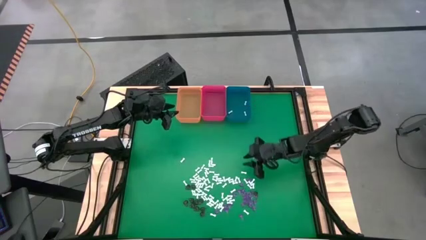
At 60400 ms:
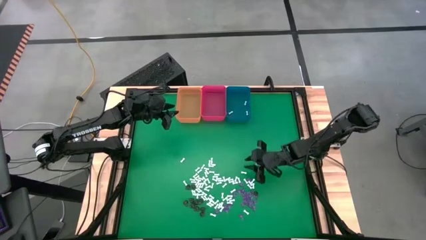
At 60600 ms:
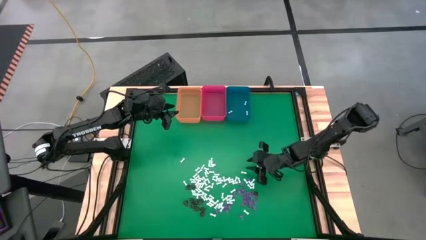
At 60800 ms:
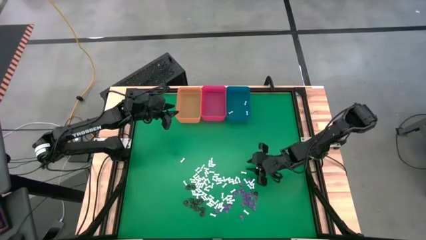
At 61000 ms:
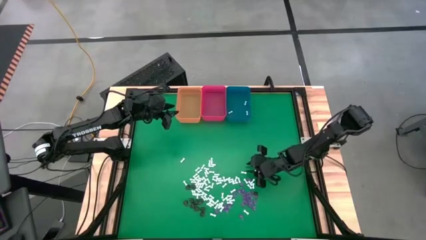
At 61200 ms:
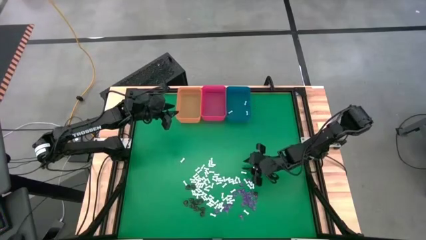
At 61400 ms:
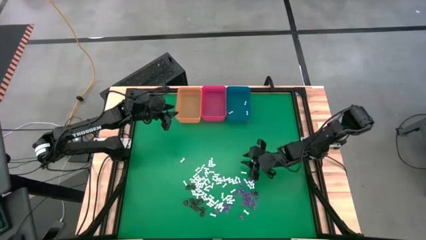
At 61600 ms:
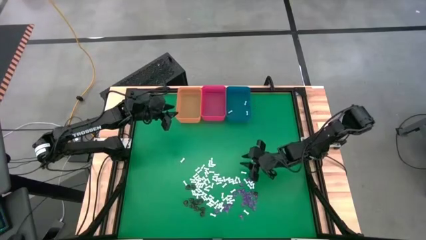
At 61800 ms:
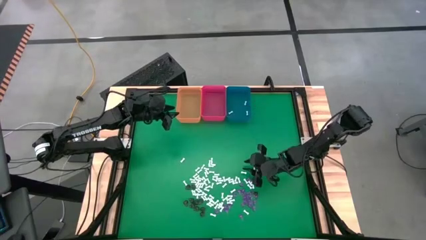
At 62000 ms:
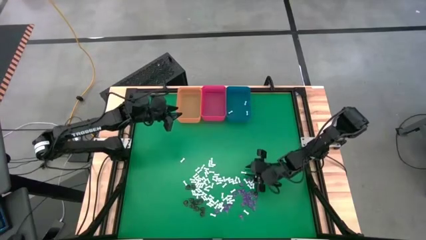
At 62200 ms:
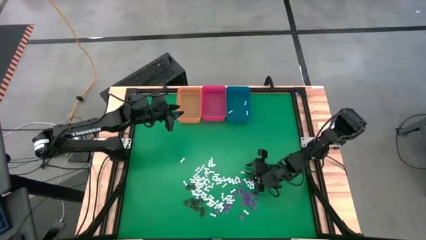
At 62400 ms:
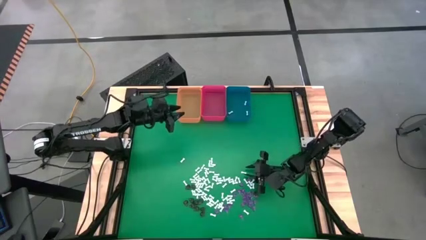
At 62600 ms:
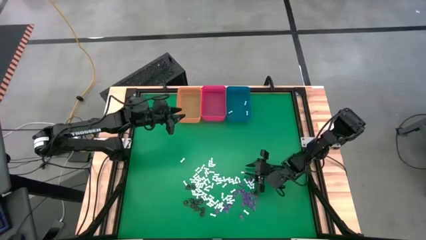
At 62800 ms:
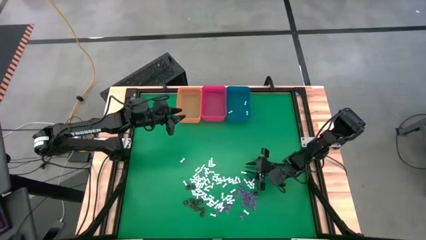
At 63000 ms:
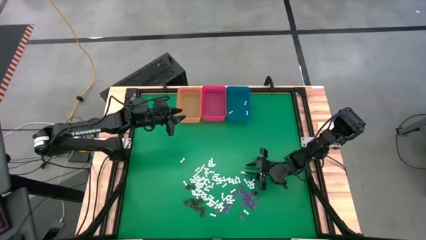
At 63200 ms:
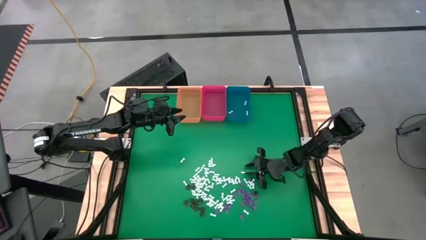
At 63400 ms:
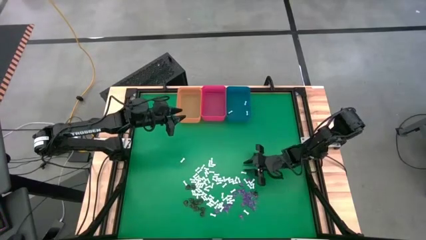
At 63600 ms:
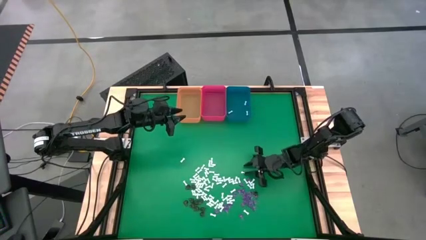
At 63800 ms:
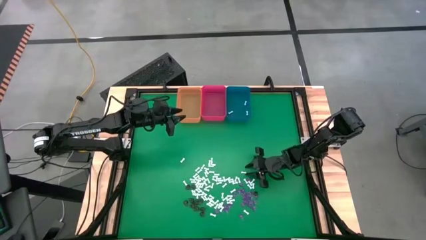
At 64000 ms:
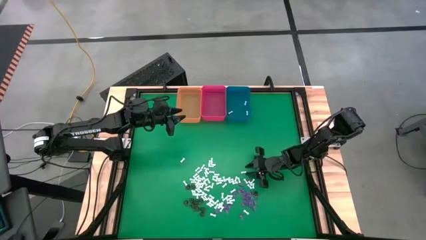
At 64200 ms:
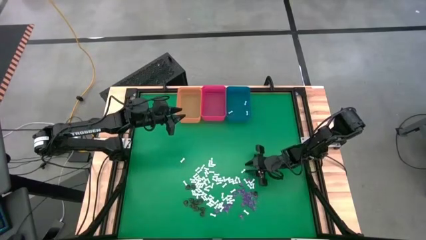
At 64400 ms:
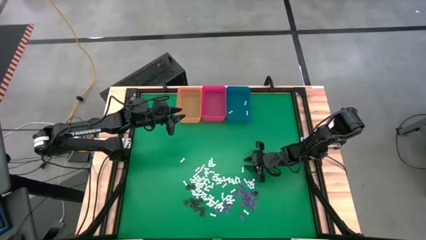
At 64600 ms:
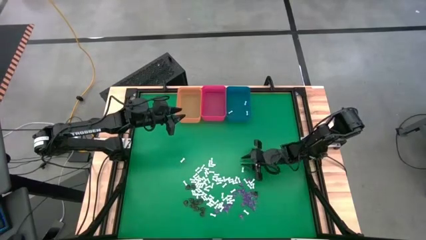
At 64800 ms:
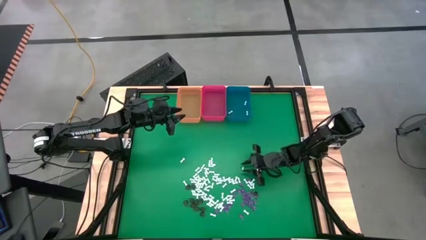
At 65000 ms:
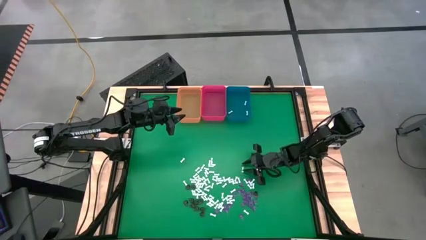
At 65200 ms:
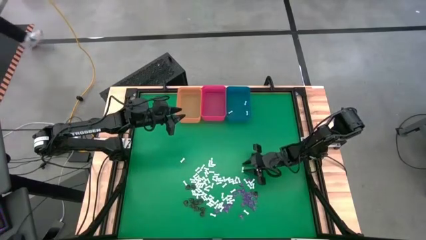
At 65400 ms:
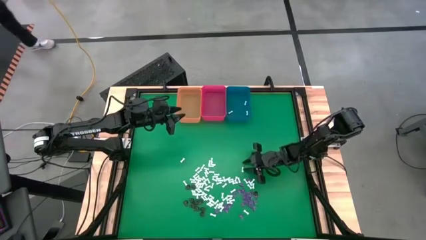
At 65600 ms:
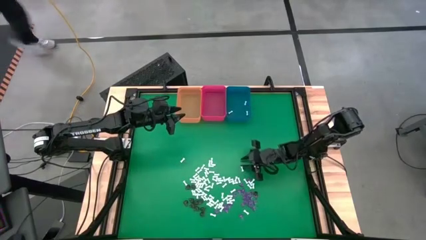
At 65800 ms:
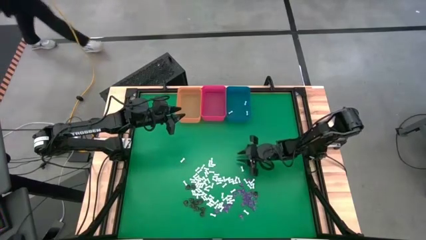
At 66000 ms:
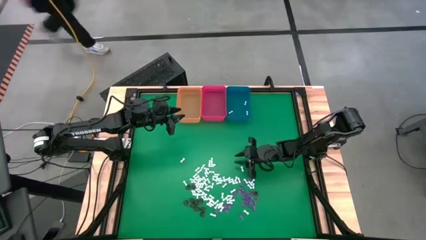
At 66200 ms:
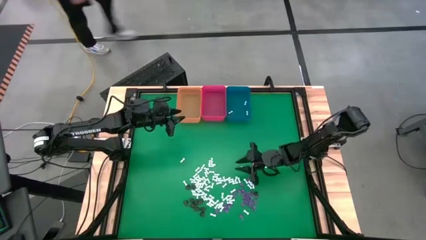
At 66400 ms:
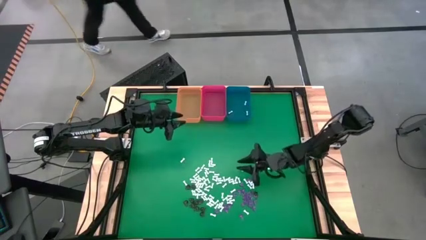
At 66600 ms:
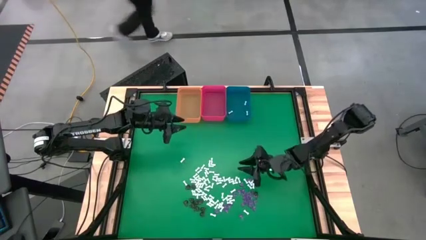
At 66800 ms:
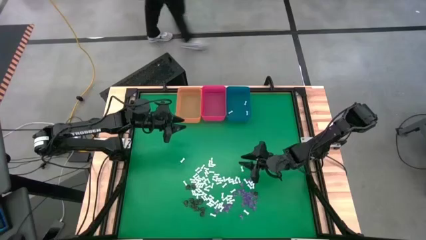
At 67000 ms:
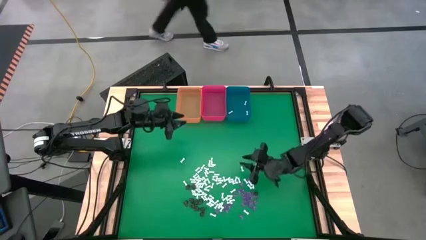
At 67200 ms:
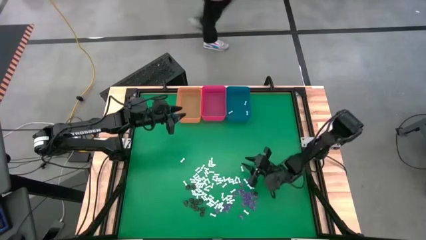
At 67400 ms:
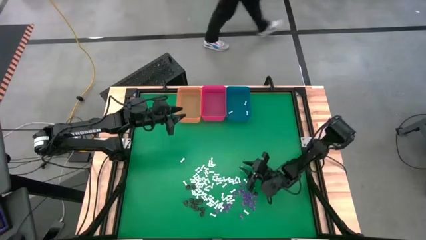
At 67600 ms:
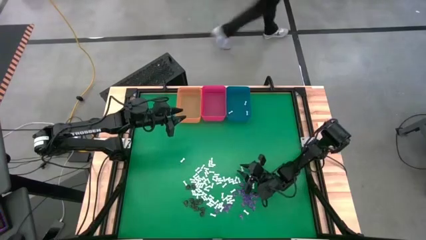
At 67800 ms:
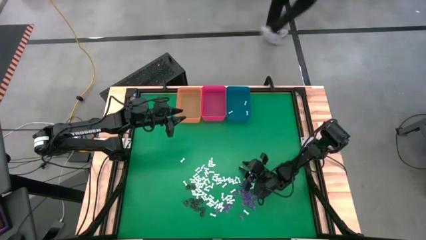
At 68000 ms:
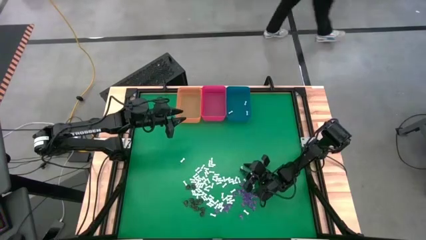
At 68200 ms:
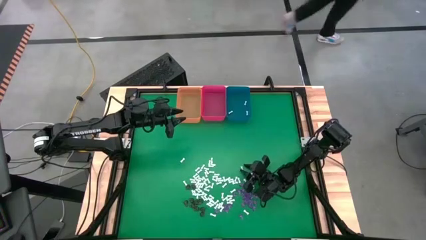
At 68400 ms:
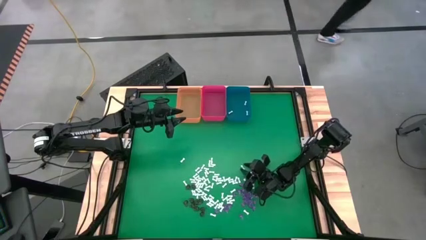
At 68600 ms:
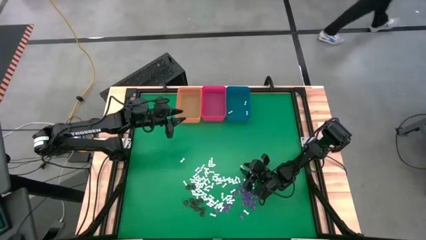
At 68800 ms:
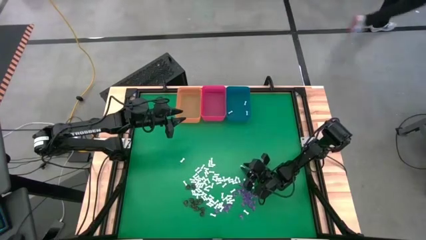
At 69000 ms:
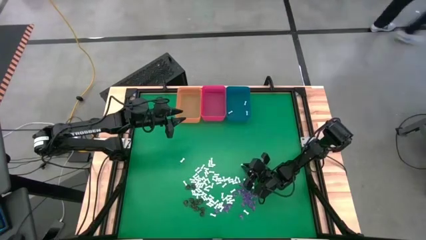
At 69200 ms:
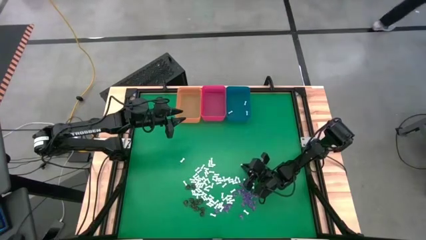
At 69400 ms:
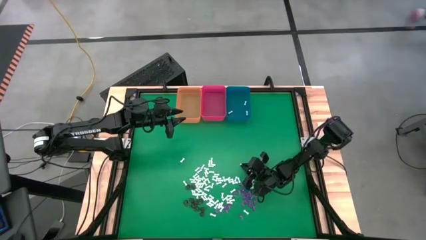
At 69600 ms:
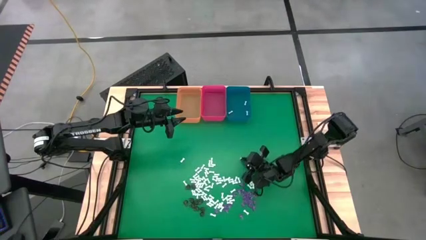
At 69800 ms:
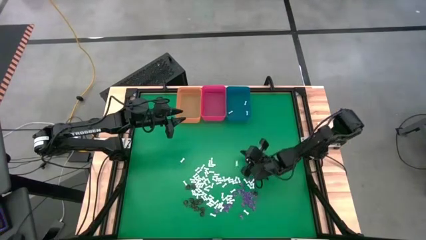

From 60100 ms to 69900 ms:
Task: Sort Halloween decoration
Put the white bone toy into the blue bin

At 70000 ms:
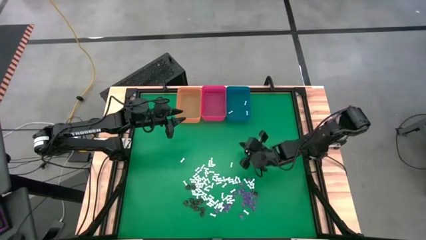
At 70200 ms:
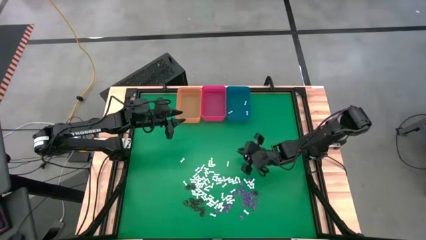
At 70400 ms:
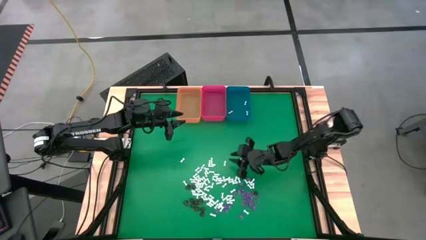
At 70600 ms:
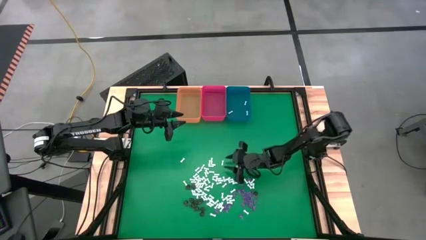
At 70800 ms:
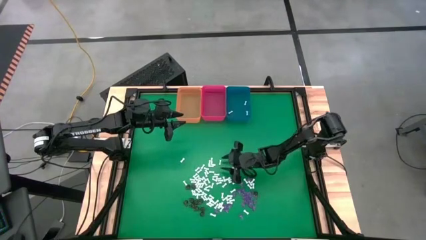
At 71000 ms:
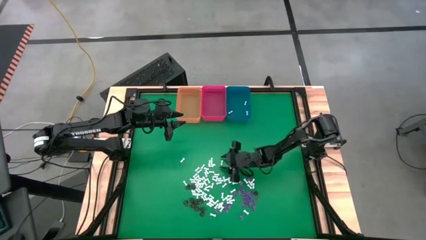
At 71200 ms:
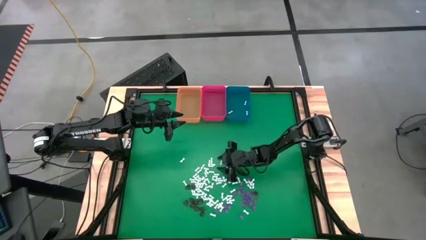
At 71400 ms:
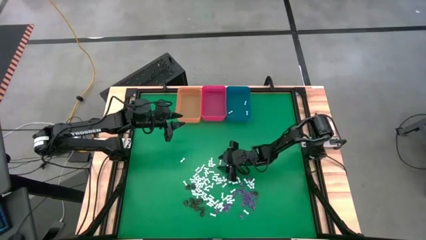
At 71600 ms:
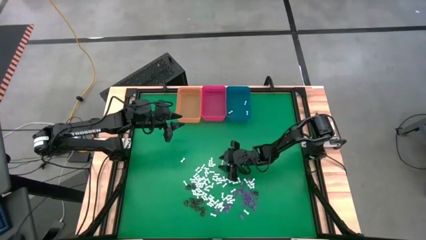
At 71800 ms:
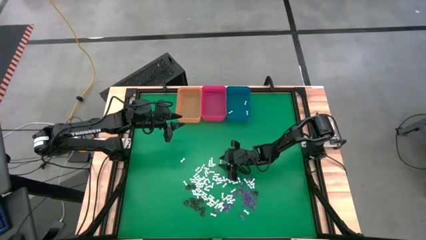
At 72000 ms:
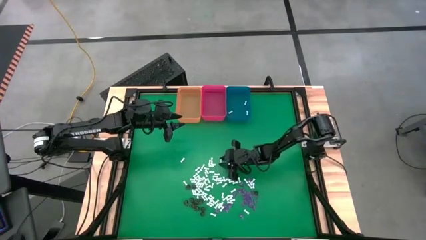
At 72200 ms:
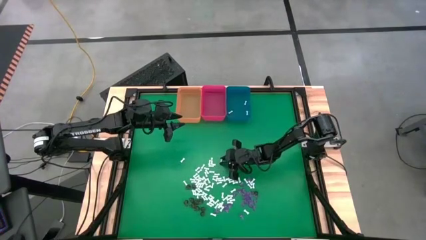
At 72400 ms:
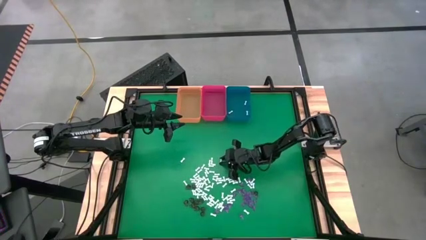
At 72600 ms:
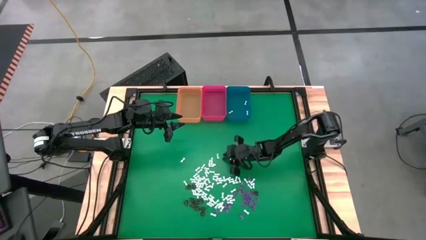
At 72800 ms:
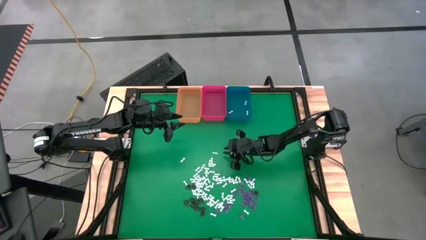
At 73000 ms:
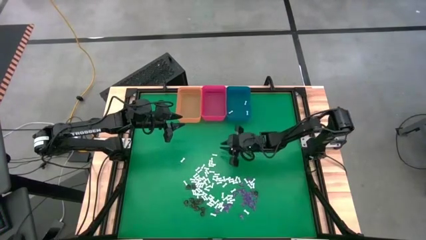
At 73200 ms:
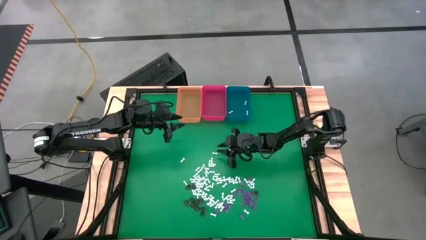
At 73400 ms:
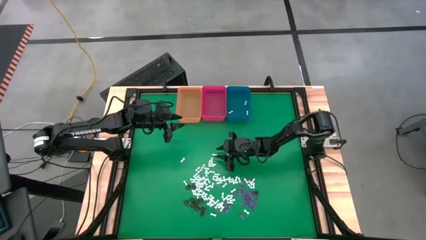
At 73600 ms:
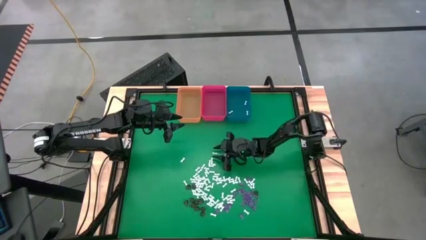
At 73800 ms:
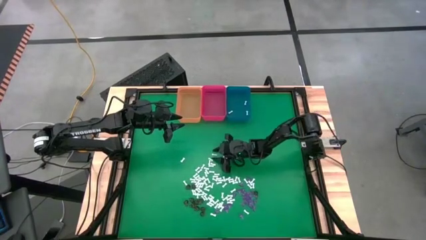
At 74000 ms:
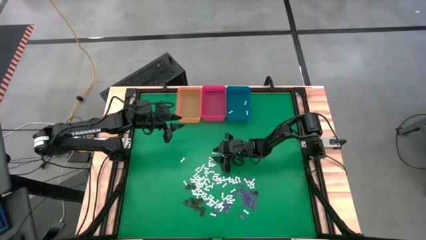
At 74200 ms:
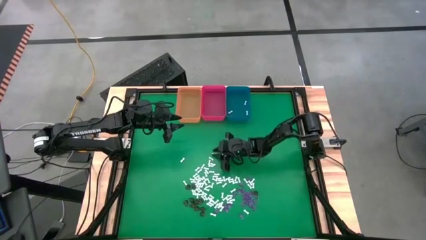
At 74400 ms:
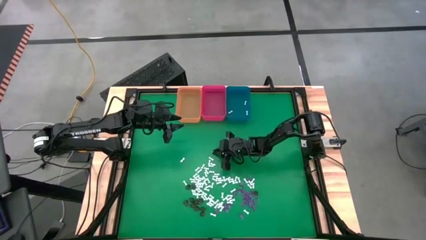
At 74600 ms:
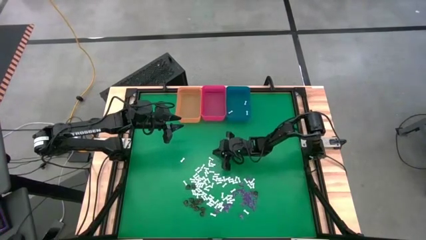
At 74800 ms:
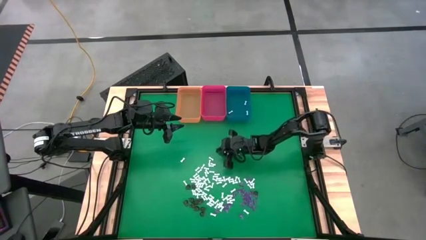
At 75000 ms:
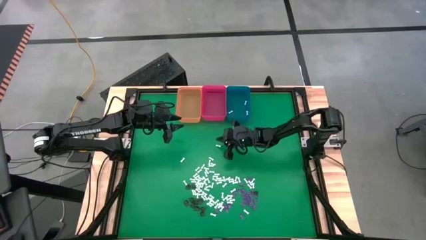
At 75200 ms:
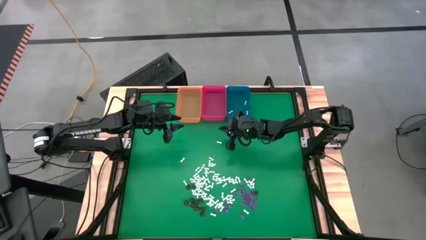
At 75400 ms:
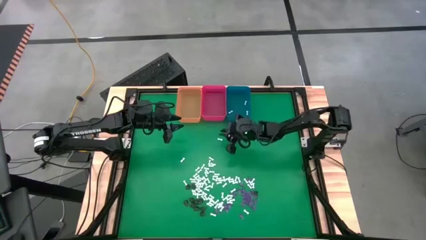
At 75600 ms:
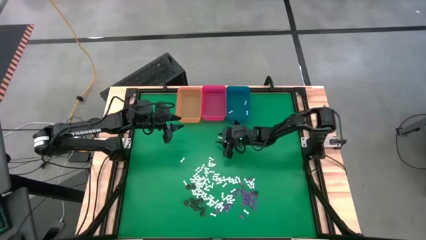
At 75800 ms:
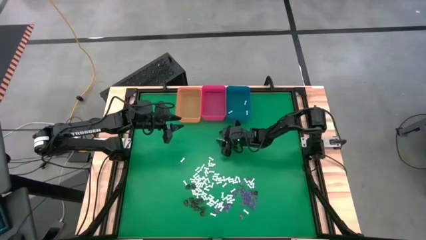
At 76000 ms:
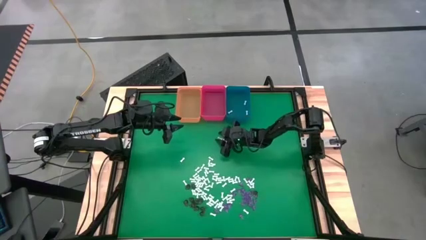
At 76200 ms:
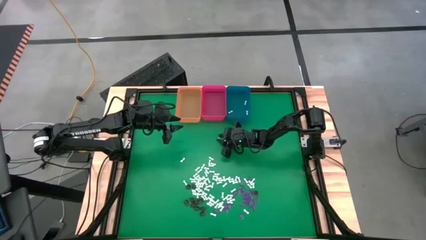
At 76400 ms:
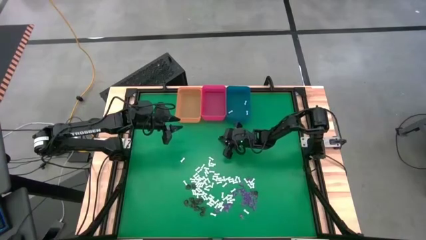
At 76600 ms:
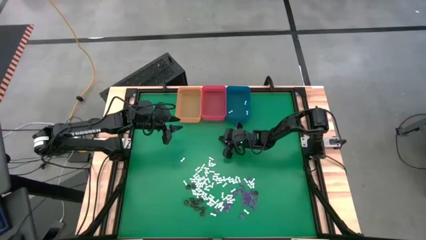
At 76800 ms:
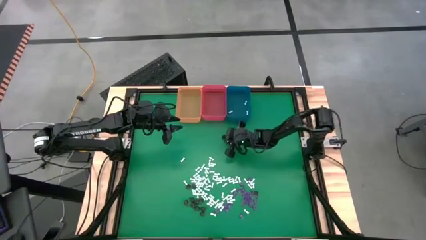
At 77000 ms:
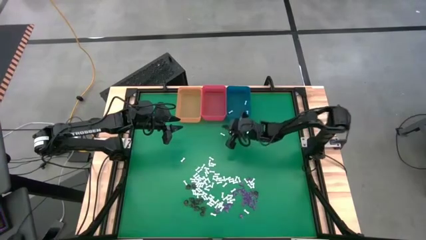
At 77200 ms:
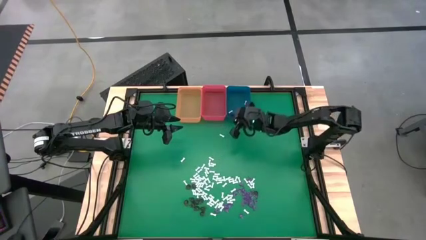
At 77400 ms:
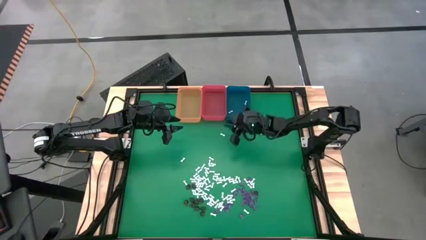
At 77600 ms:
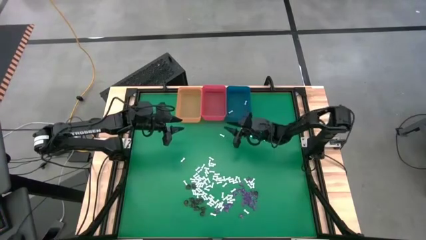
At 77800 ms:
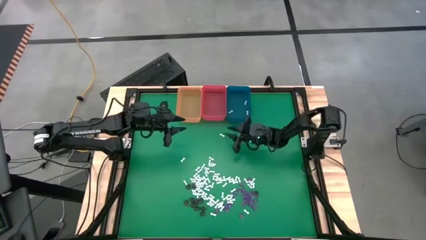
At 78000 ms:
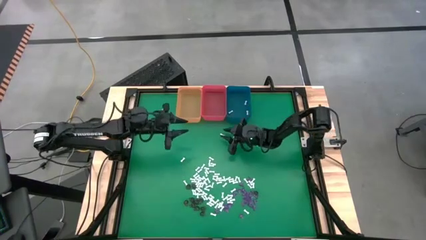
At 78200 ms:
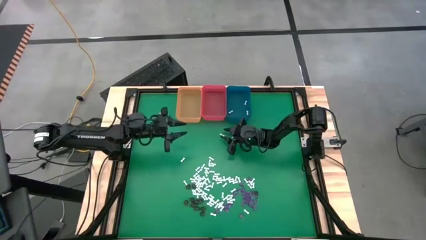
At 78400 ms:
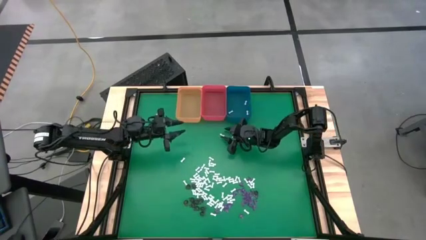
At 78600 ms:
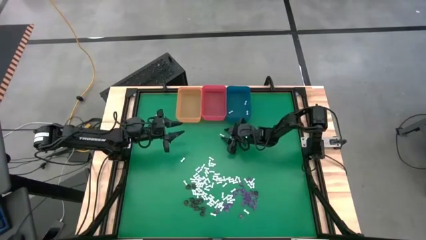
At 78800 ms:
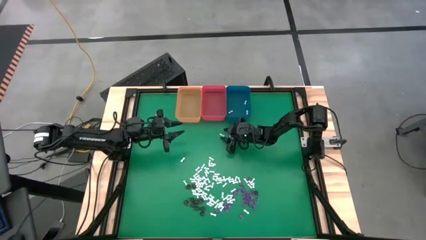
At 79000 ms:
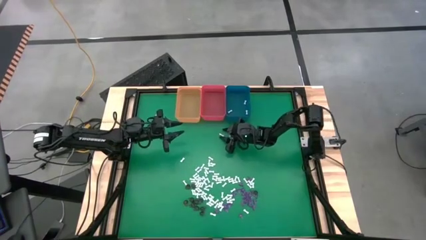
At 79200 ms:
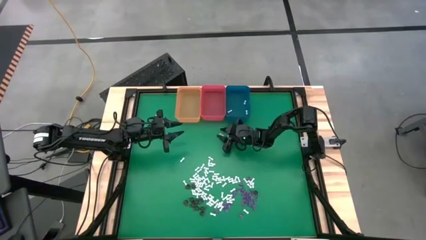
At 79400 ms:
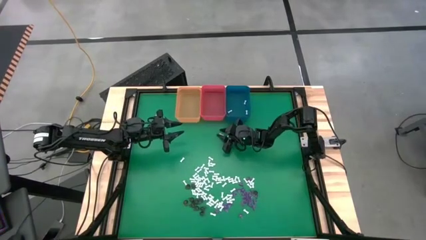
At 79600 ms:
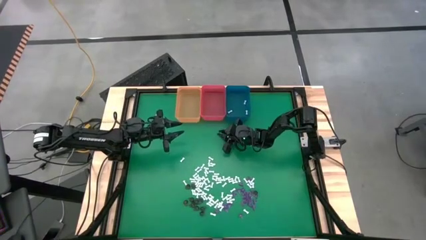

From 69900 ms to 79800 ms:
Put the white bone toy into the blue bin
